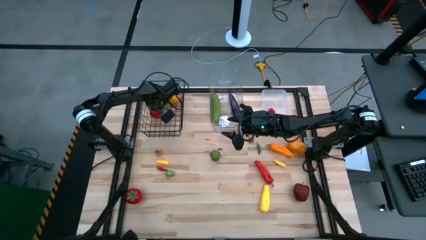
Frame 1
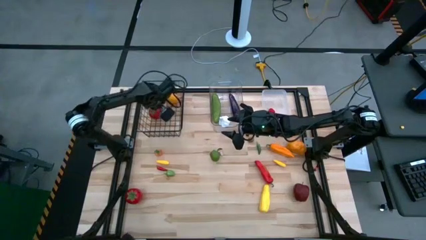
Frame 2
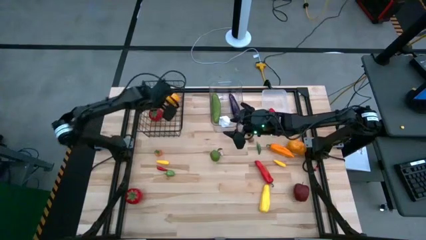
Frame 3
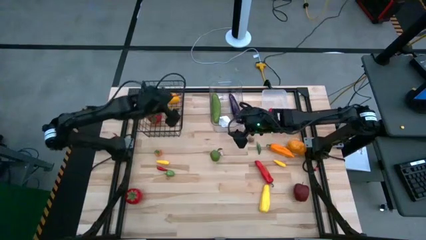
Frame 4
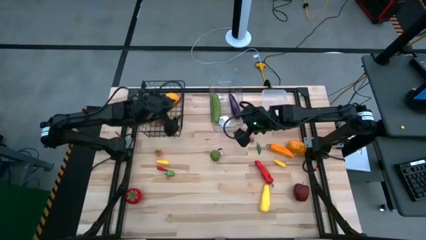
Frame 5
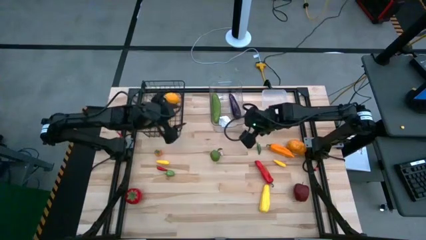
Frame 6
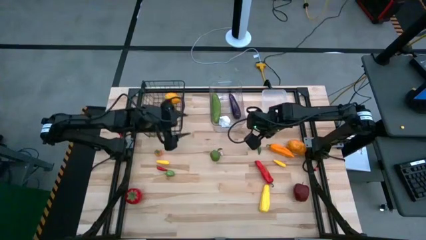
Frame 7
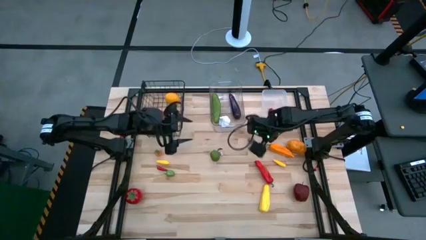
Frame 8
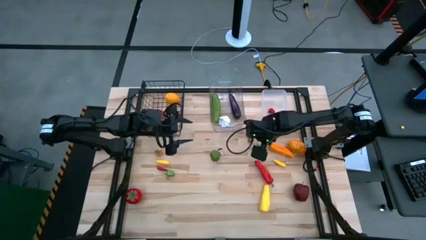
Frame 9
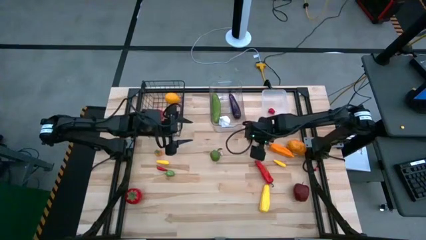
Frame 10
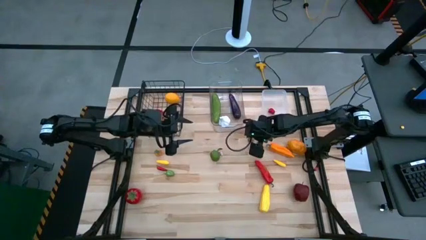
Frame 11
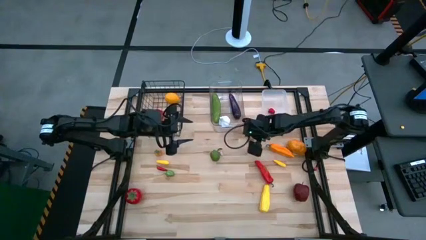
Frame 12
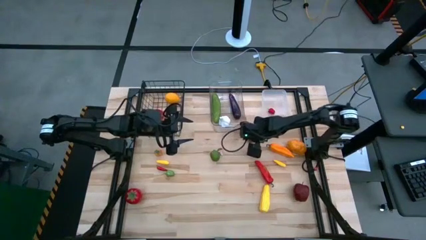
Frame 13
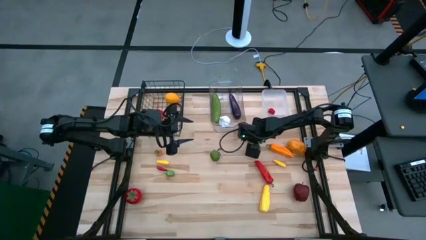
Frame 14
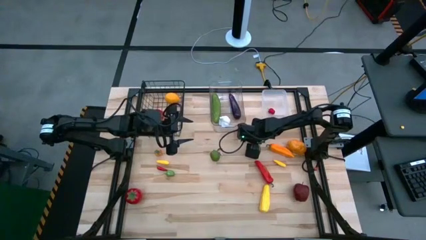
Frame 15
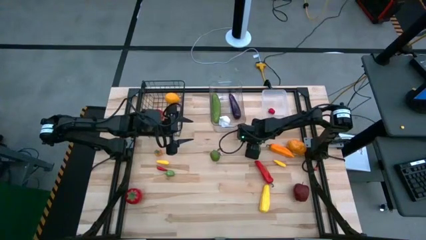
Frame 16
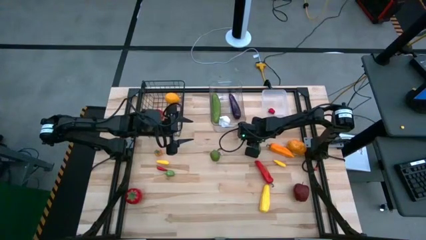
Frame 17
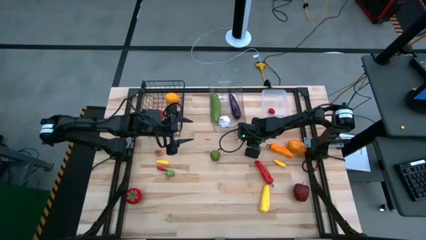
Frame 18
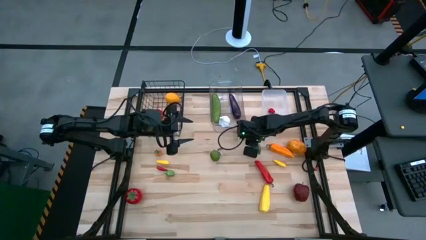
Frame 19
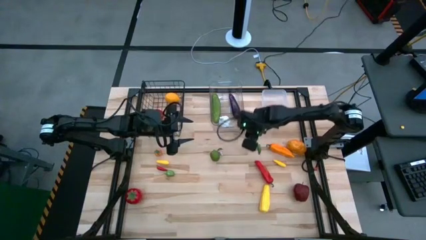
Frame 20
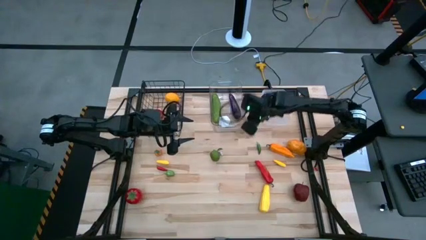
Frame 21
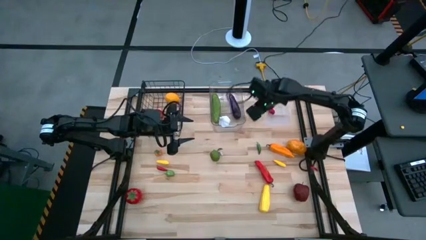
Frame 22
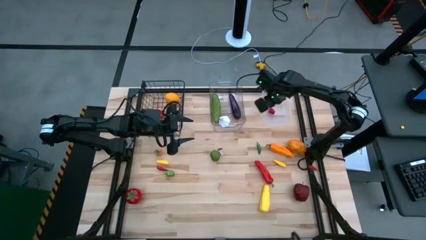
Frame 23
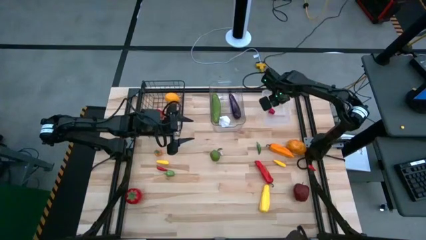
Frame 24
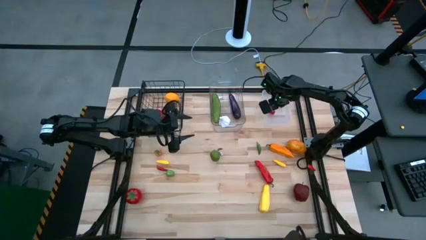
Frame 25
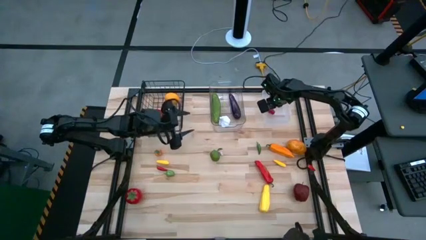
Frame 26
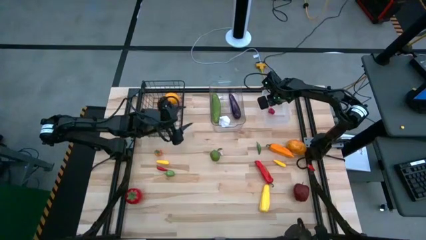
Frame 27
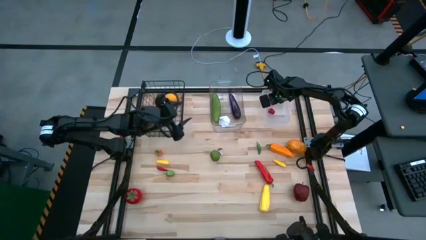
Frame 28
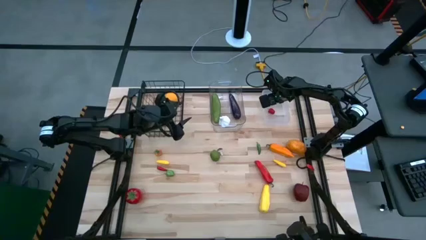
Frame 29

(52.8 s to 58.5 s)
Task: Sort produce into baskets
Put the brown hog plum into the right transparent bin

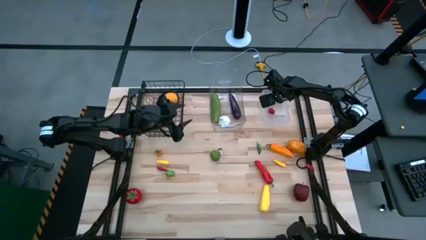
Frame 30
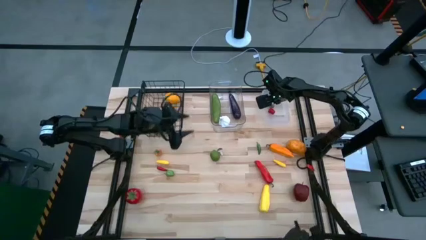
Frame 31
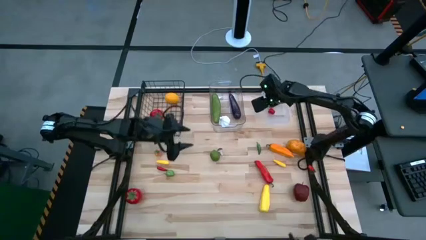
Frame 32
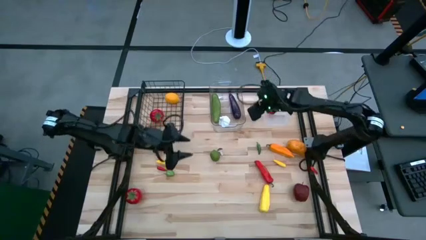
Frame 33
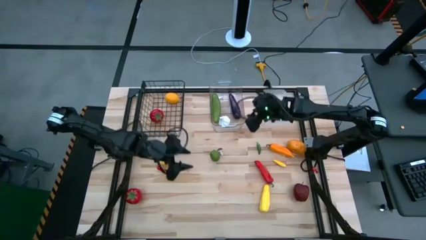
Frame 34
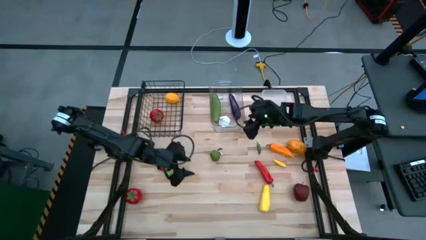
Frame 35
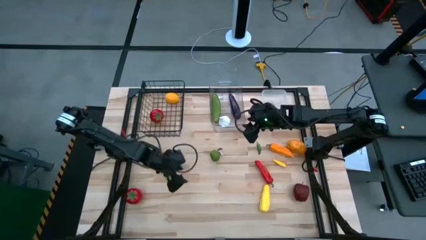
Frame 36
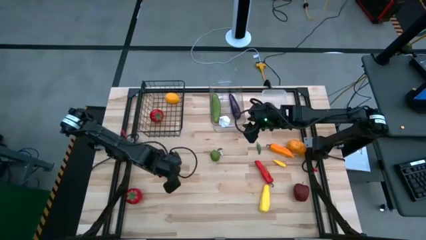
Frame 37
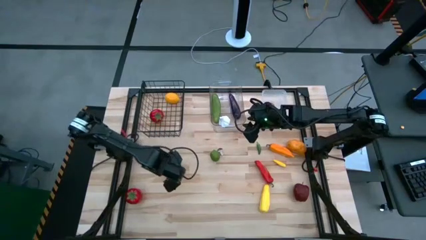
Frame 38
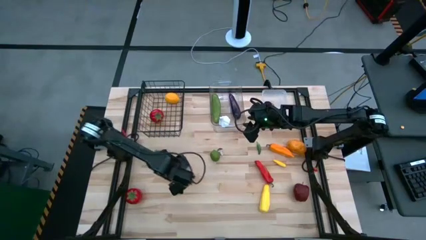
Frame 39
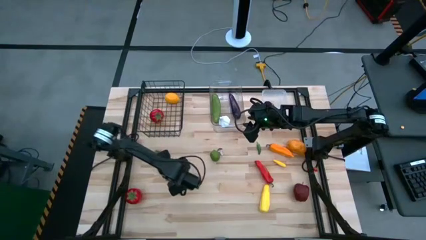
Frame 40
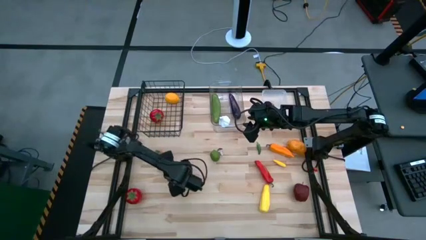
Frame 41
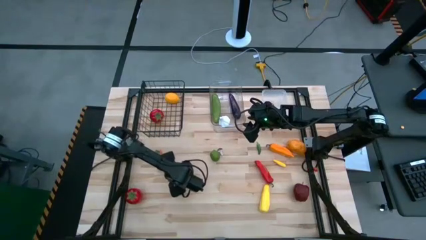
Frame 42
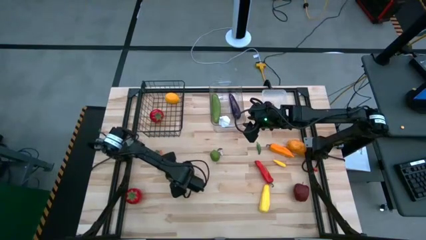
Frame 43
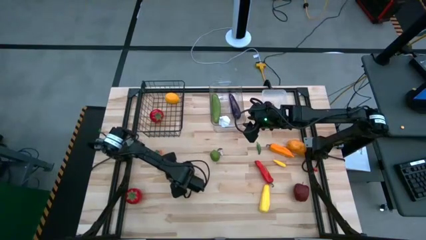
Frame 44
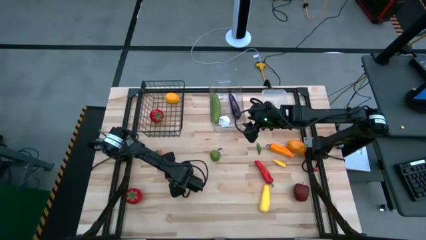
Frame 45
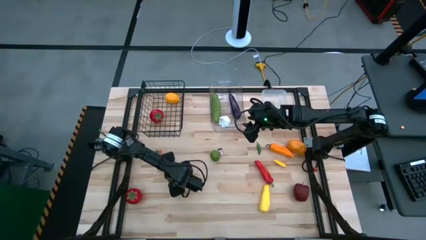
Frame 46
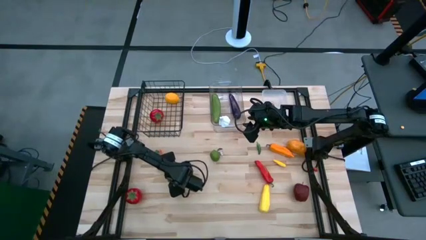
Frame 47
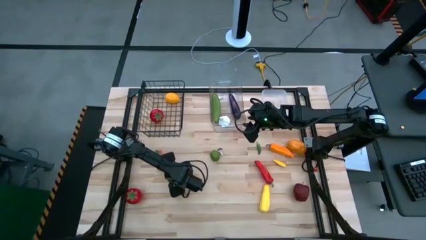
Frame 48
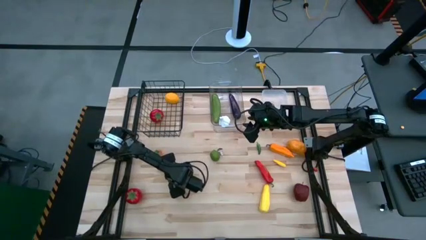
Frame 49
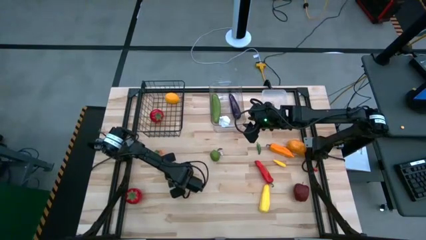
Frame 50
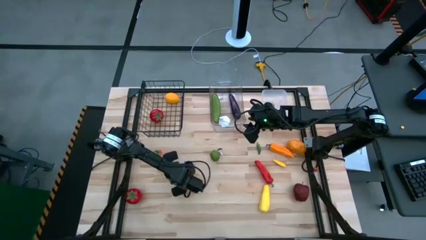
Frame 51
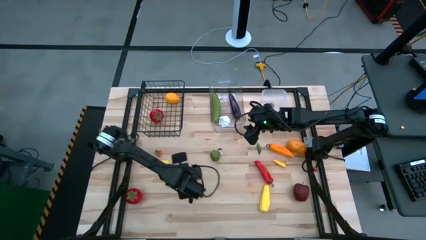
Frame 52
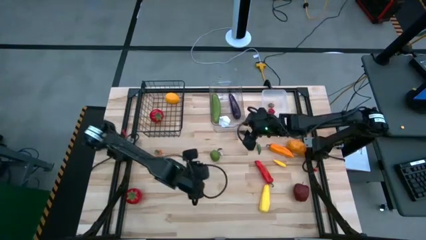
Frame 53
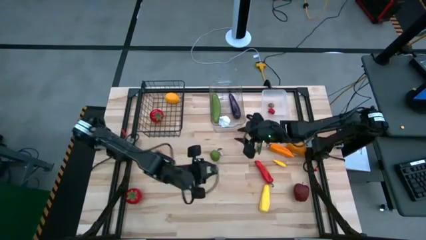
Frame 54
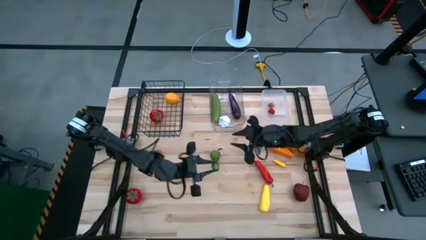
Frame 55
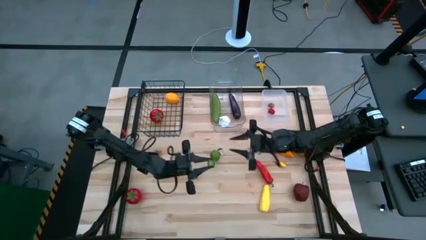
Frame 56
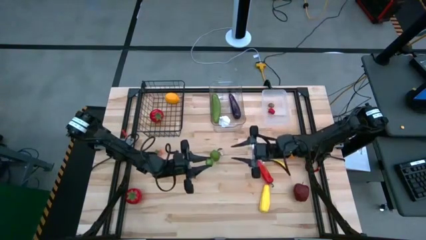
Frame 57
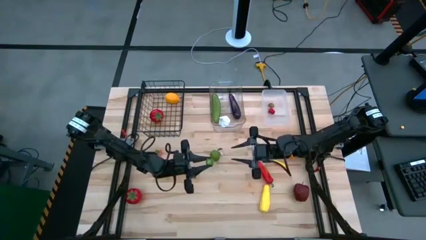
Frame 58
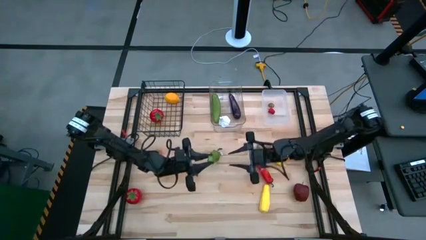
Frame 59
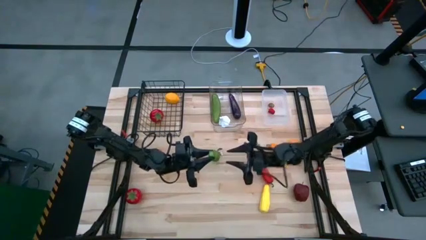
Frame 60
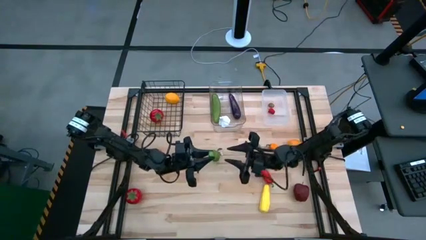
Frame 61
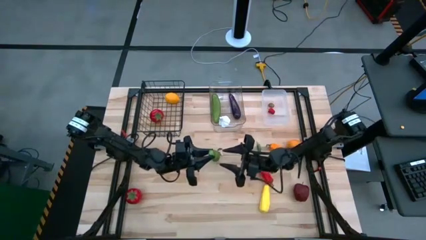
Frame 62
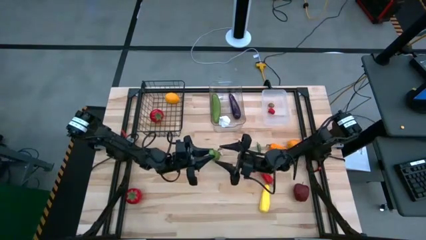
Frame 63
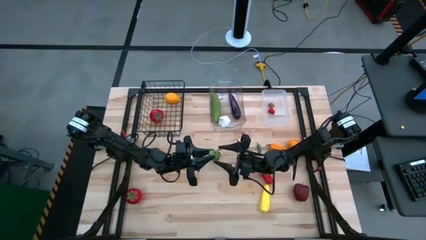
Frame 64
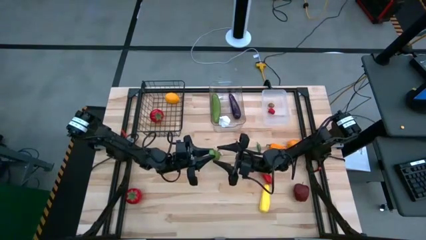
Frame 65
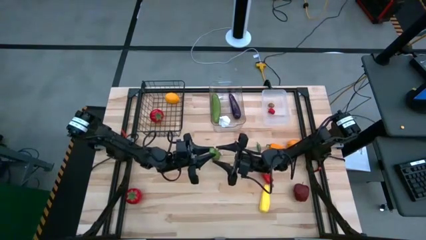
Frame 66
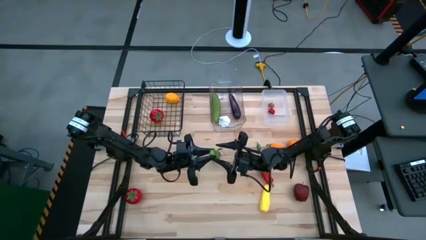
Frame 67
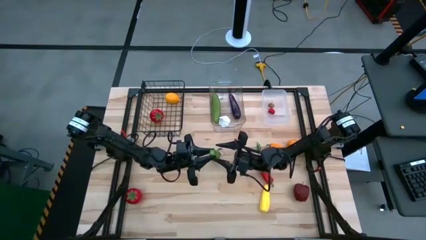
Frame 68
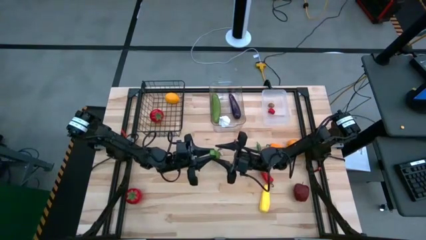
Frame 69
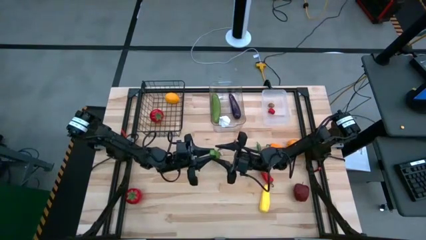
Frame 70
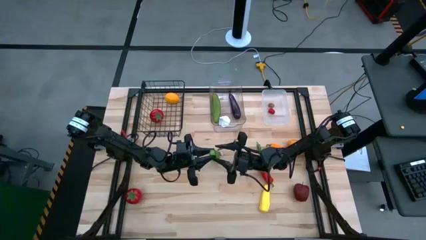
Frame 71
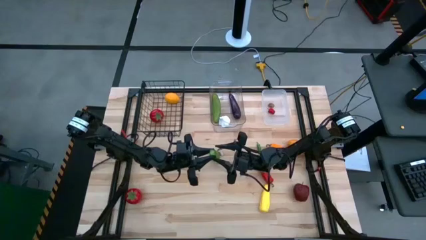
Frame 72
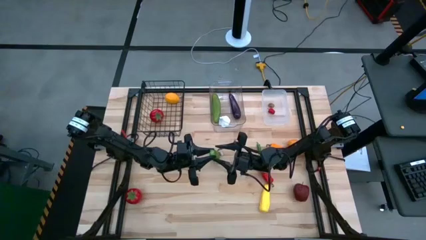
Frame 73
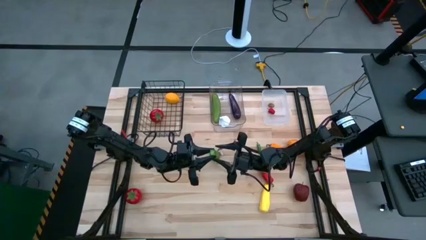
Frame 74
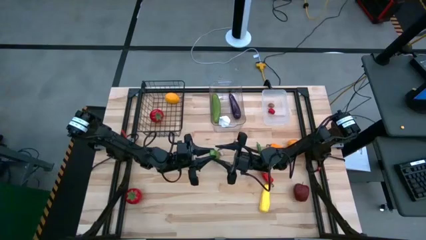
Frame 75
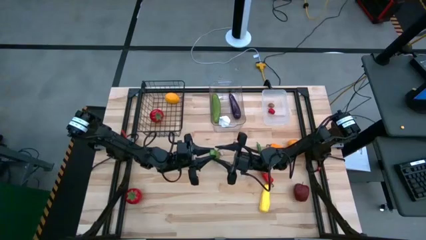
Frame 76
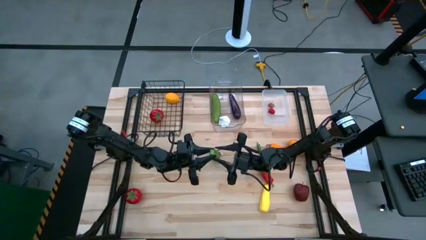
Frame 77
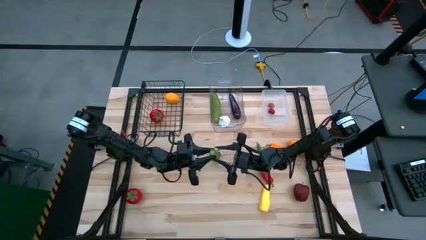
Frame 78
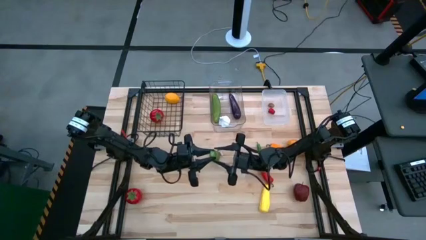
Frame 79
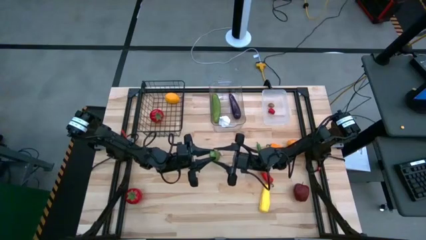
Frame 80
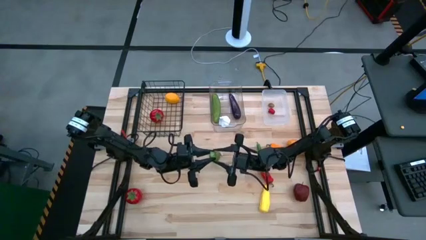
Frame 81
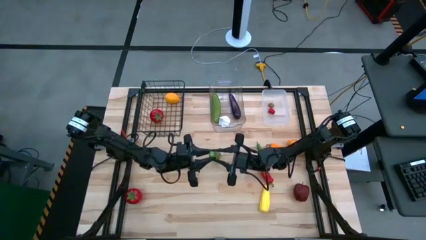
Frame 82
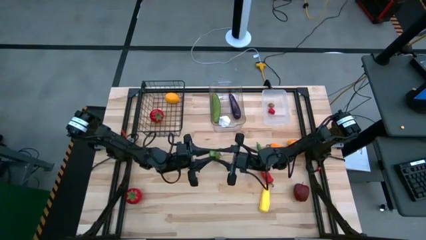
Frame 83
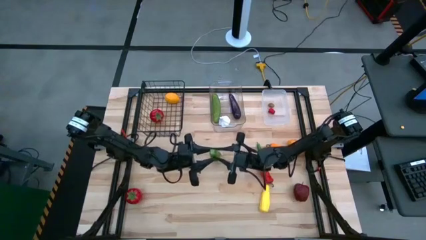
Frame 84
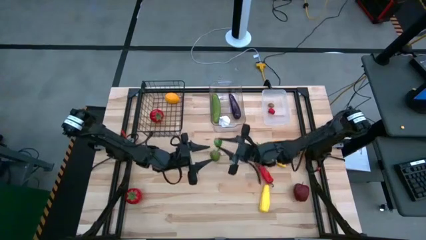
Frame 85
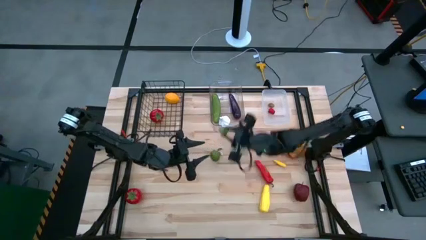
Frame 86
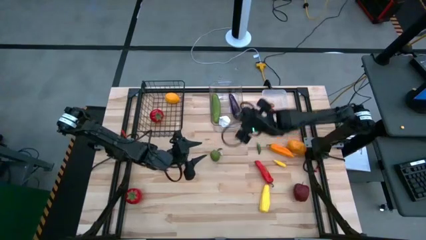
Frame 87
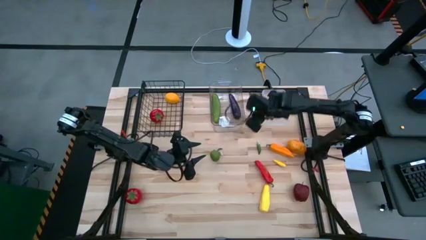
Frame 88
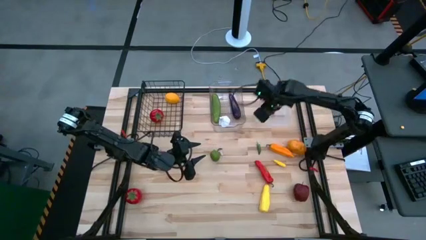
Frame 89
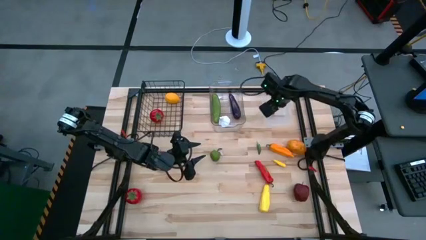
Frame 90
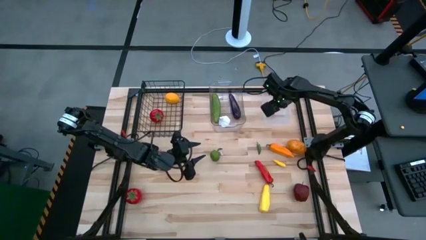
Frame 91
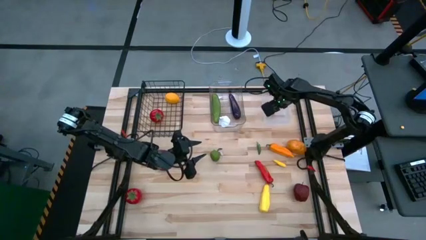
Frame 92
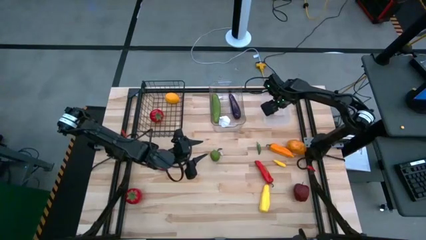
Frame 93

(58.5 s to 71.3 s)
Put the green chili pepper into the right transparent bin
